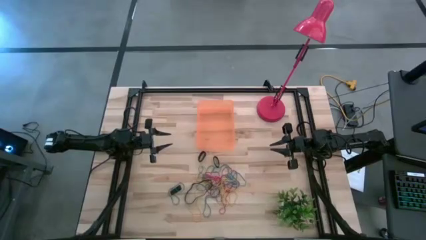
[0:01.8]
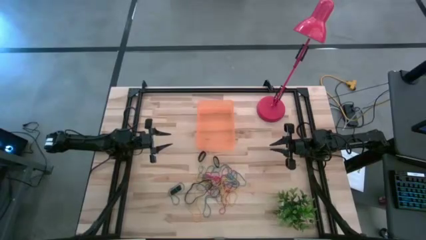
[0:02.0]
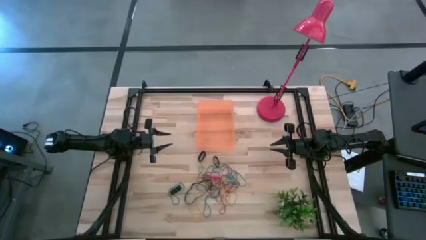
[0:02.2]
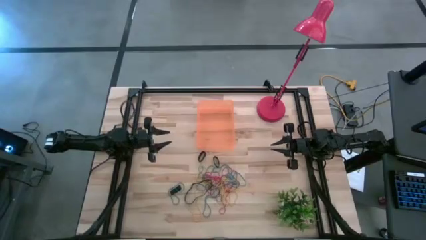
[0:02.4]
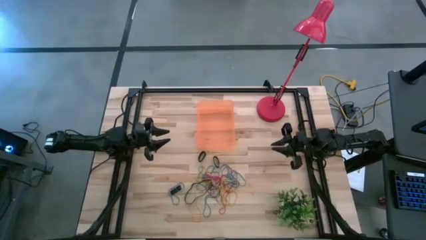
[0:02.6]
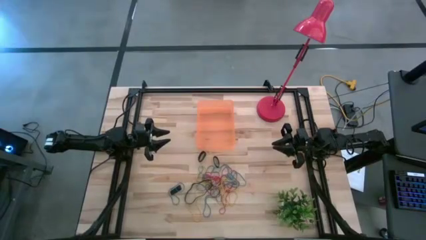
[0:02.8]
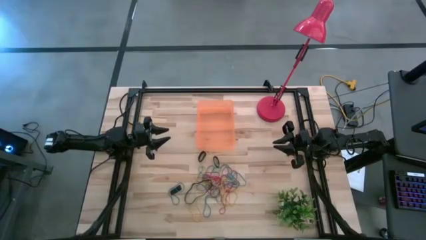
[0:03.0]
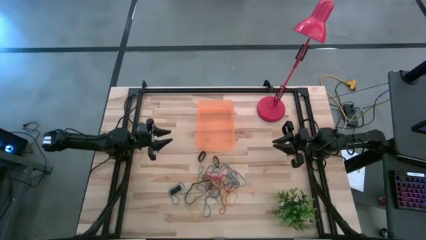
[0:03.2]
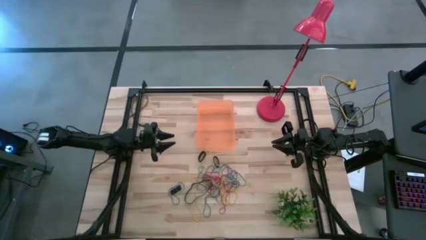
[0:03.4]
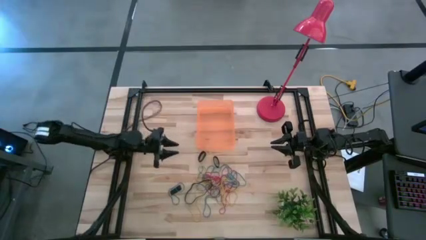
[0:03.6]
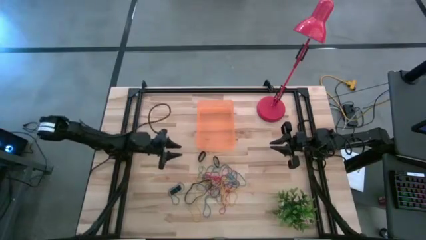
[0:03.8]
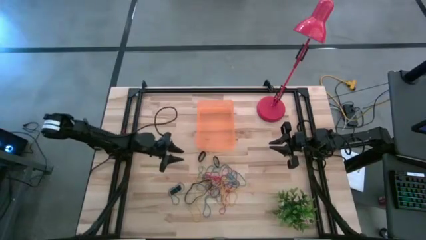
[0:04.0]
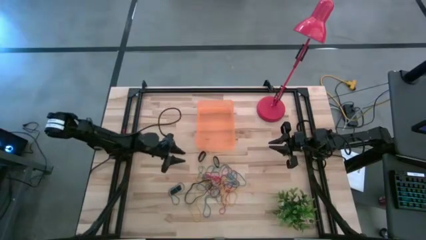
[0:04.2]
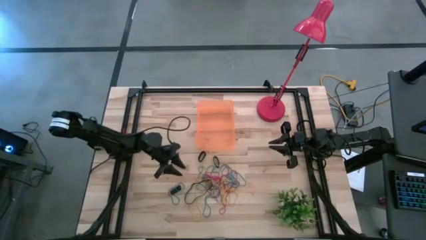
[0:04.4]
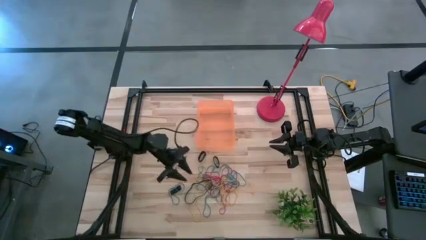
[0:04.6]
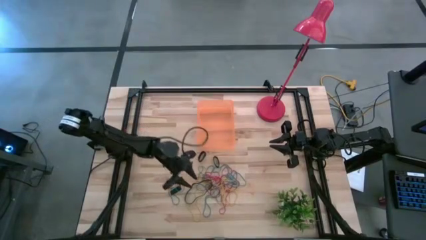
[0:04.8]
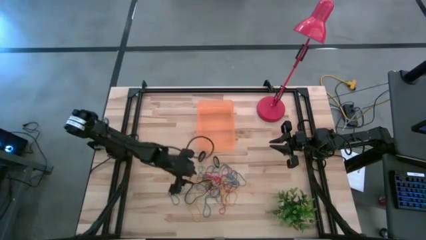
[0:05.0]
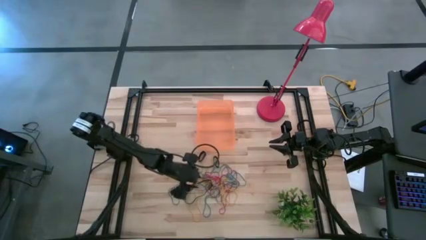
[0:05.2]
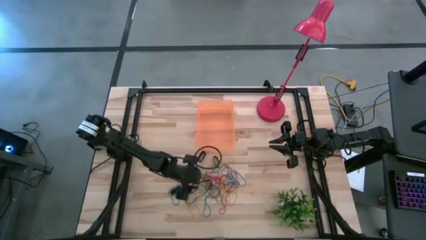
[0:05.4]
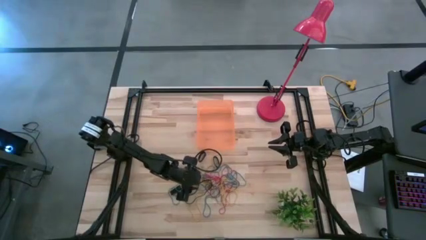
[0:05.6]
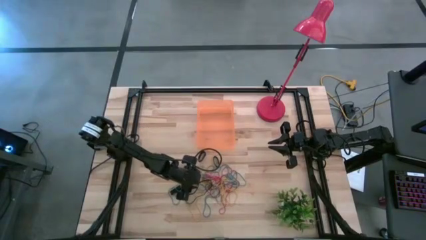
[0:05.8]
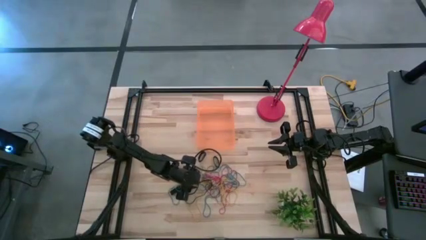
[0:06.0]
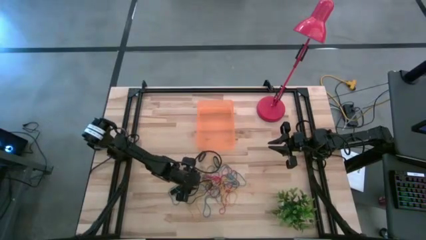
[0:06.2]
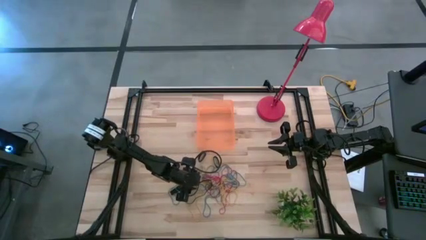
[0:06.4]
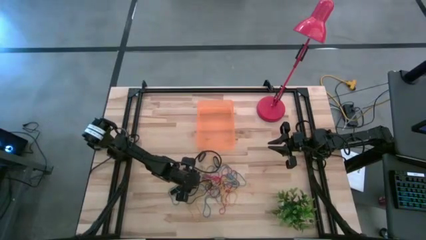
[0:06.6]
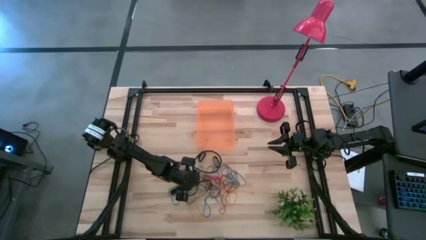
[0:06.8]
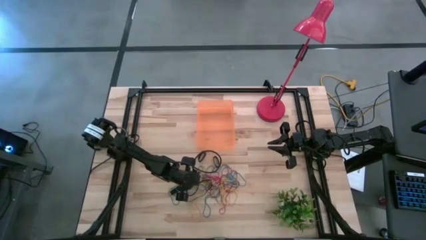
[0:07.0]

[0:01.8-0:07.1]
Task: Pick and place rubber bands into bin
Put the black rubber band into the orange bin

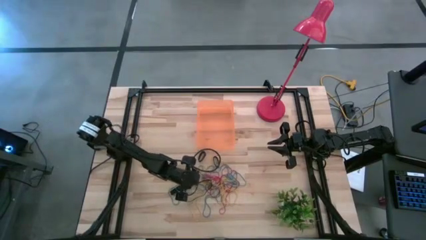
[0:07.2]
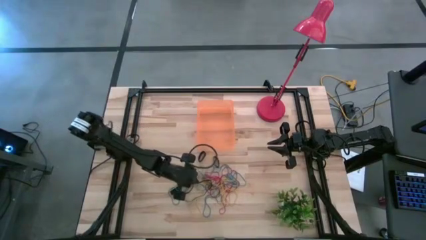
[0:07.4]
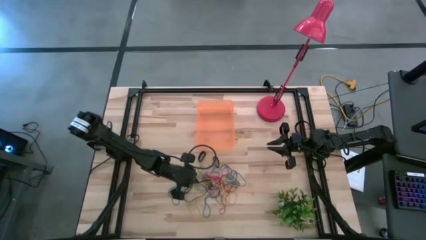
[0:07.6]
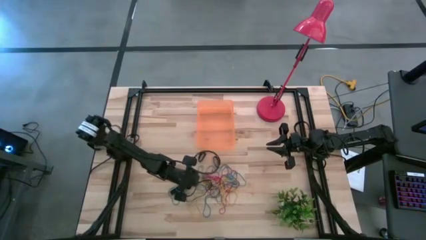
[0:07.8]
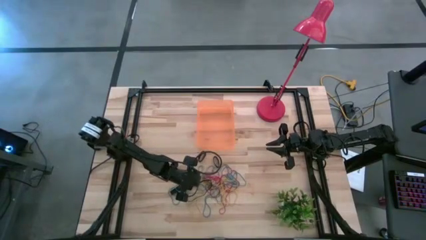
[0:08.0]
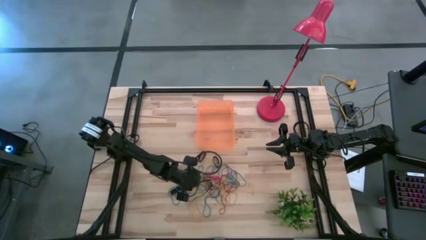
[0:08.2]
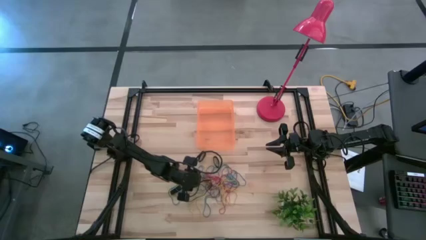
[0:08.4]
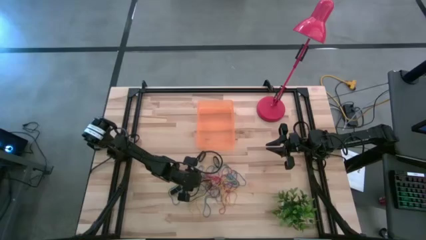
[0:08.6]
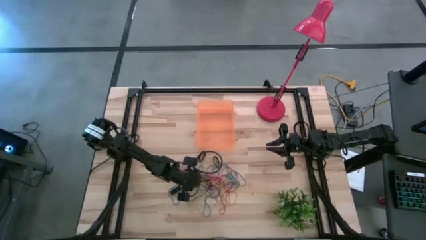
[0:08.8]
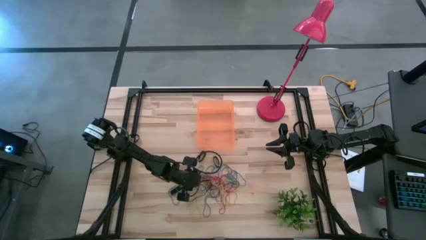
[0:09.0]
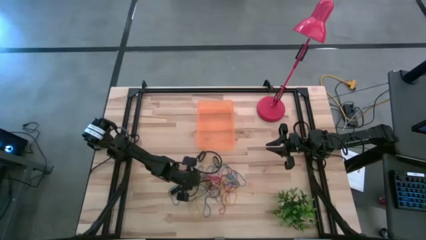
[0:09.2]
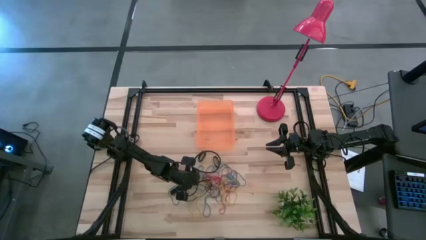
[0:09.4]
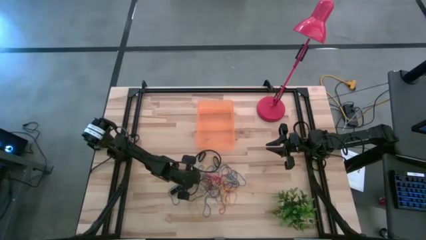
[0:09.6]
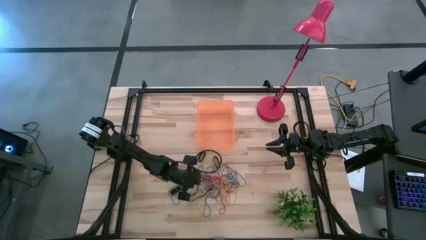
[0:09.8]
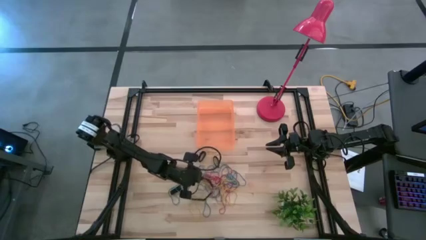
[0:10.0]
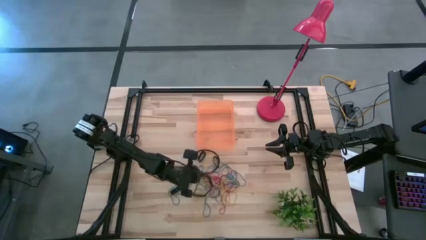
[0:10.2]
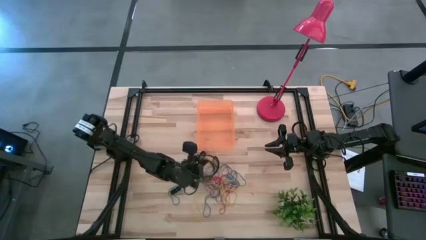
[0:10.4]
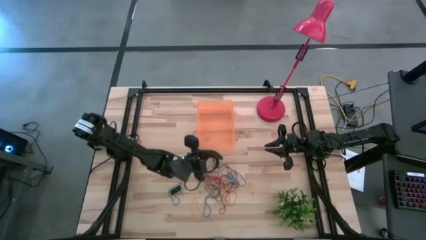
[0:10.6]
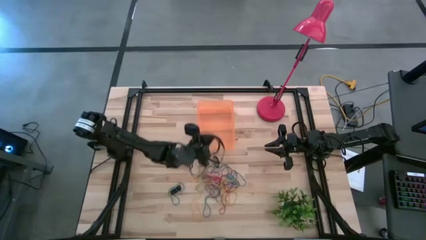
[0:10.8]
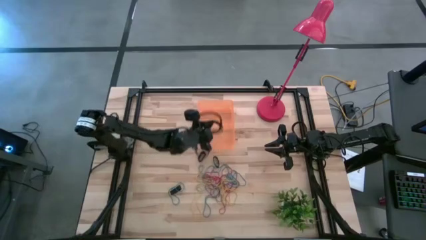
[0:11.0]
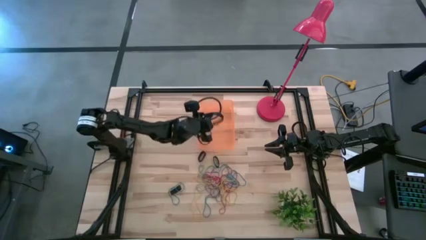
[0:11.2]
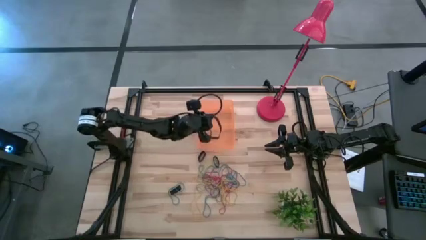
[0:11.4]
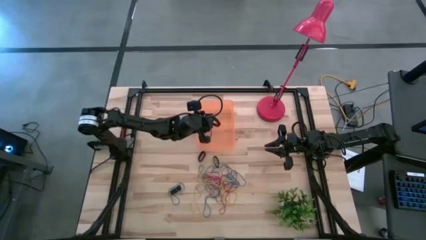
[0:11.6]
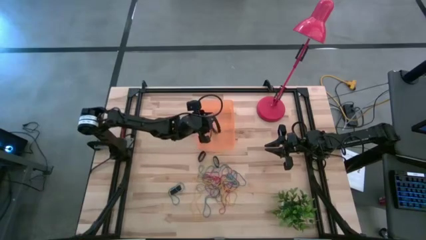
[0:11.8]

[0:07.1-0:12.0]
Put the black rubber band into the orange bin

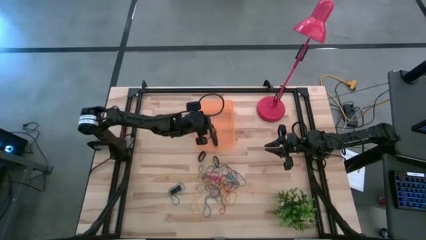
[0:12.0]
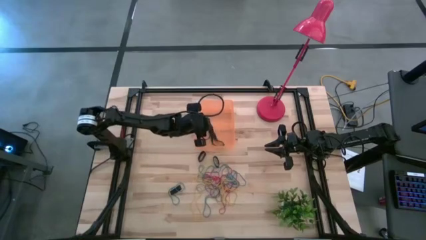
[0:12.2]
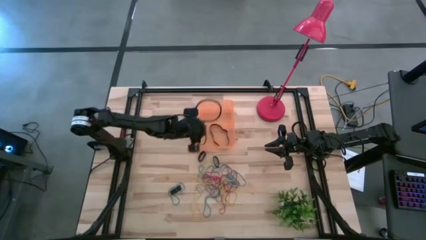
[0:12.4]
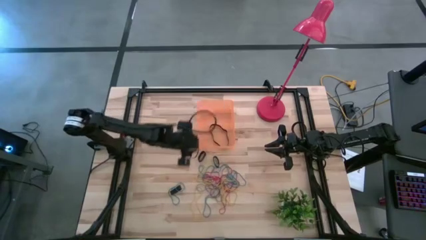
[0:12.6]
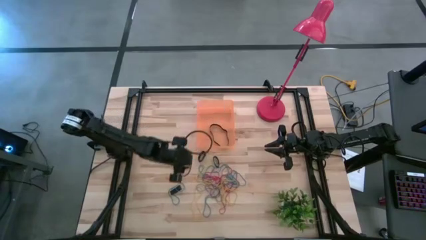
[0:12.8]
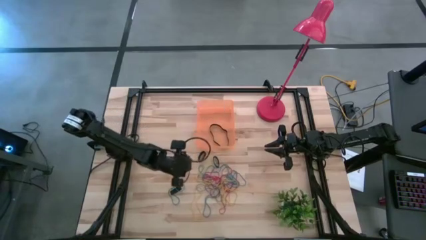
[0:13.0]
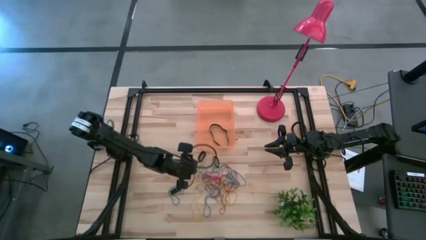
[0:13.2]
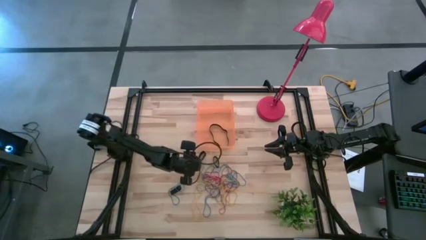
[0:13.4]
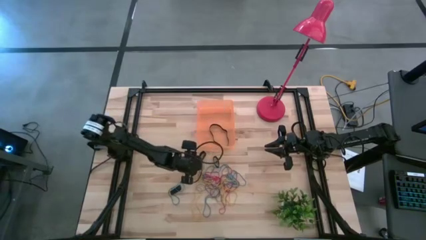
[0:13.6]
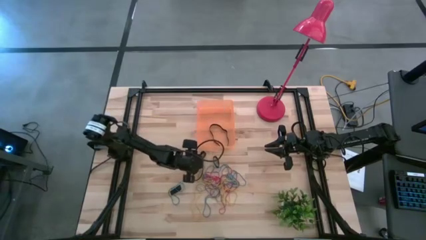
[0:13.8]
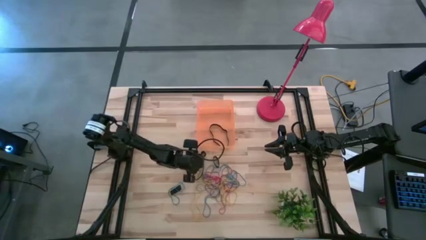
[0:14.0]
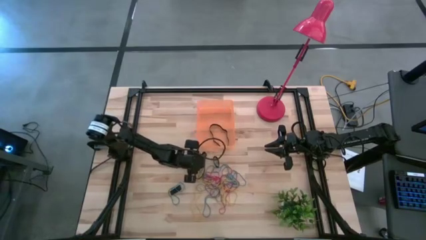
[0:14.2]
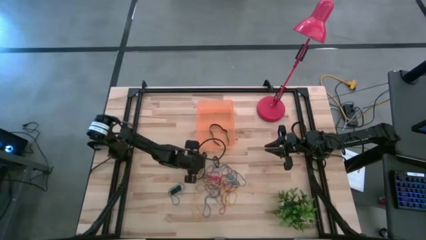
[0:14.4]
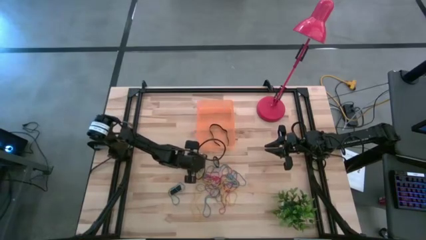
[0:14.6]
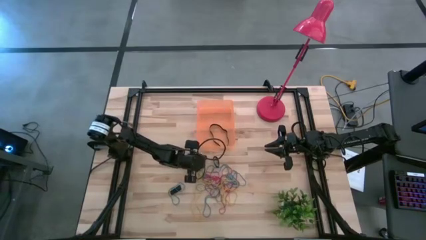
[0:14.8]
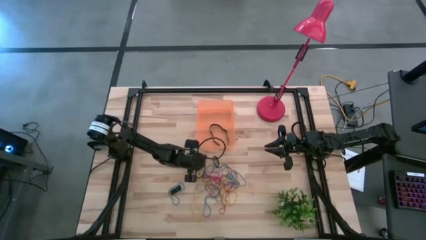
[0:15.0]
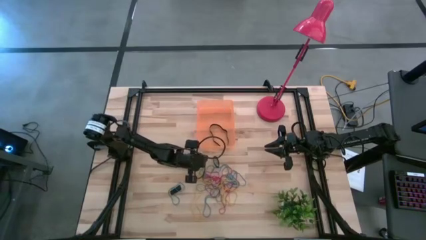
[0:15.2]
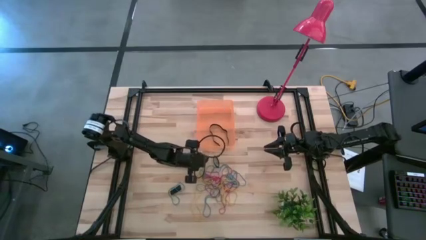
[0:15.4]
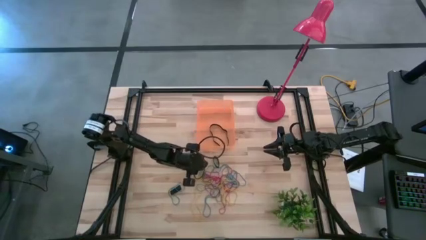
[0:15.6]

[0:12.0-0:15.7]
Put the black rubber band into the orange bin

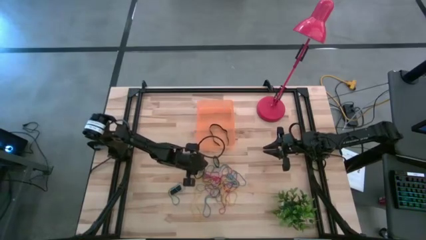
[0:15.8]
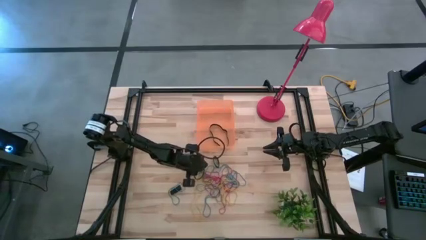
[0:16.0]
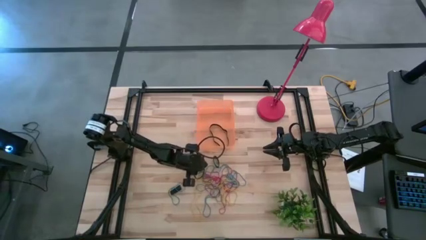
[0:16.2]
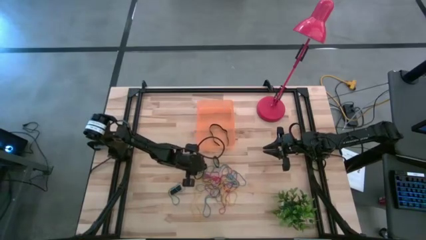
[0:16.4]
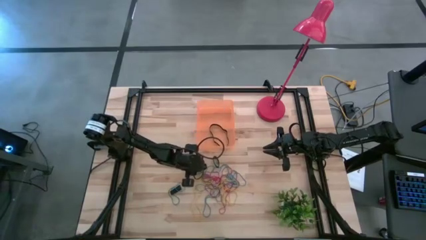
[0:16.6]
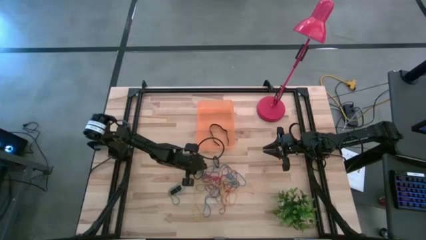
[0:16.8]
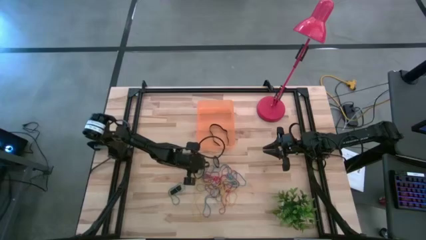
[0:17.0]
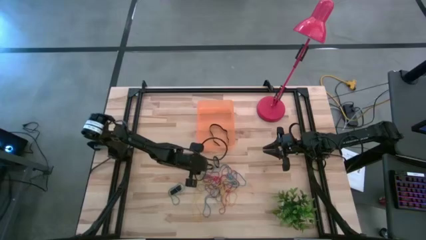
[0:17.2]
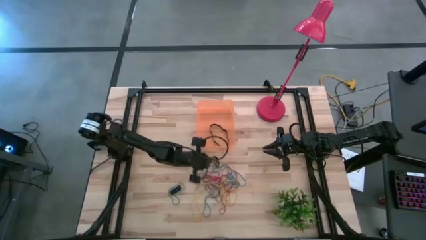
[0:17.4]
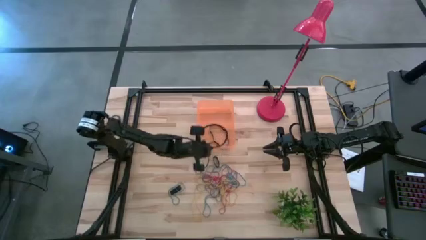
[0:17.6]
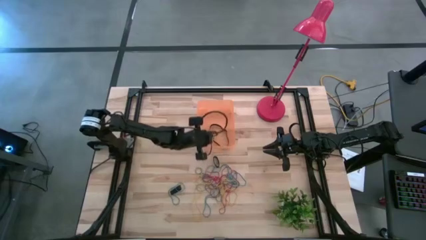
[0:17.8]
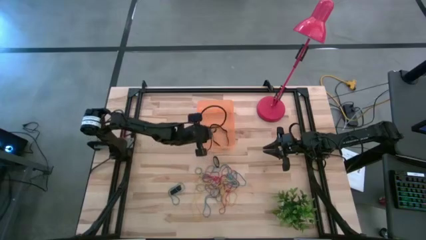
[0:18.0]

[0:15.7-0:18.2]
Put the black rubber band into the orange bin

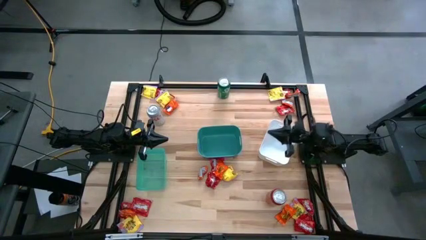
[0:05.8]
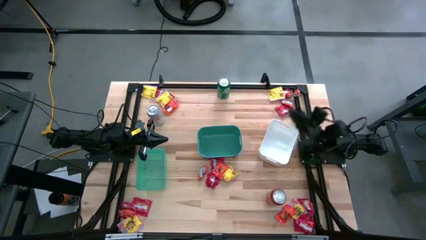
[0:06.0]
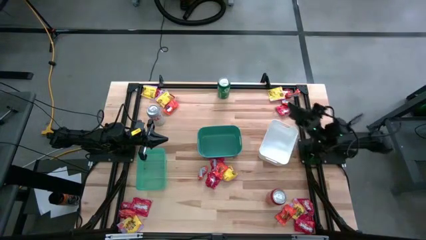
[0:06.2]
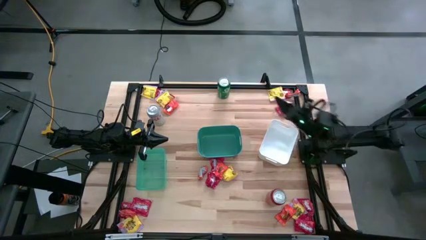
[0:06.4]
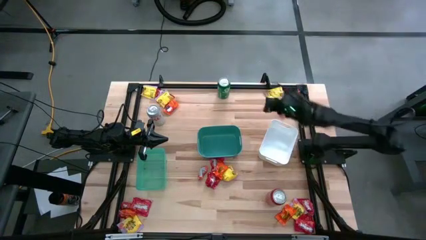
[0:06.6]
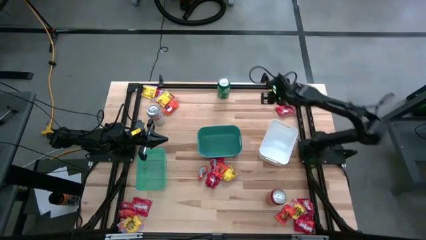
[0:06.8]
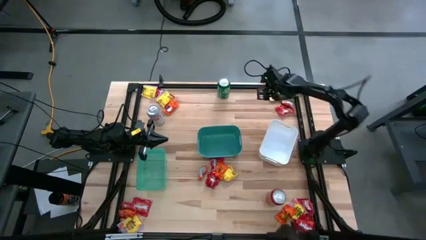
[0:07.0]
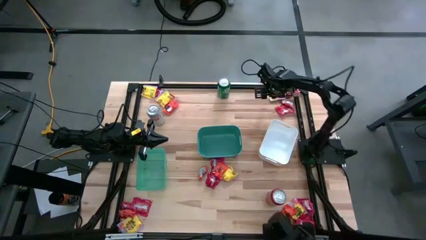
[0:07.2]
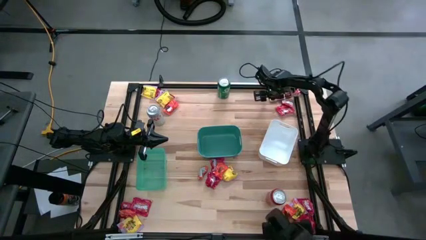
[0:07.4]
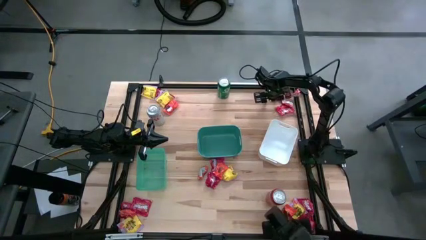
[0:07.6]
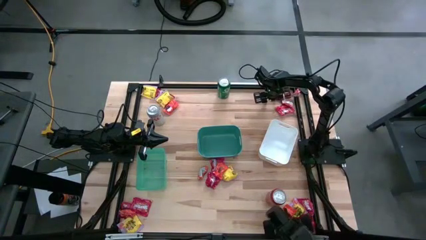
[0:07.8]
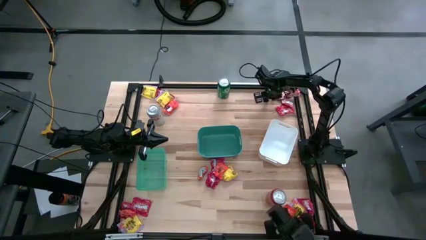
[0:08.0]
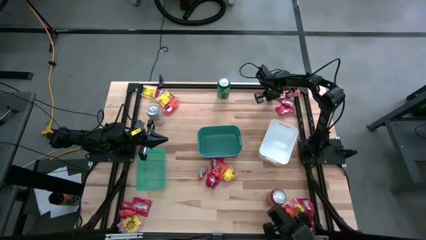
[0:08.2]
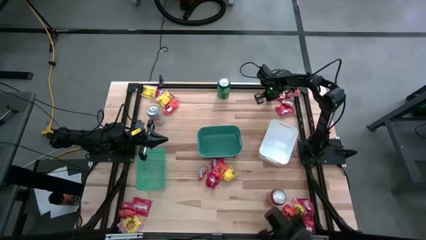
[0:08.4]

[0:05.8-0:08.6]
Task: Sort candy
Put the yellow candy into the white bin
